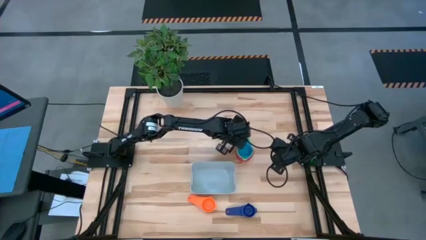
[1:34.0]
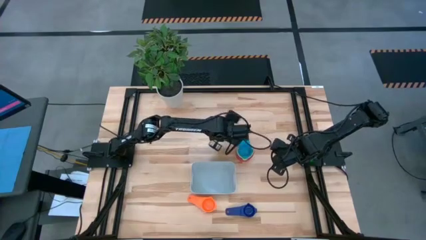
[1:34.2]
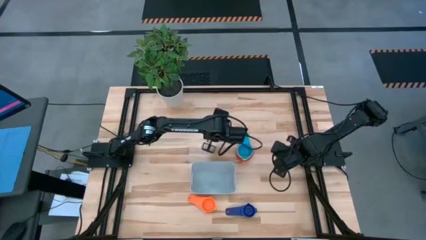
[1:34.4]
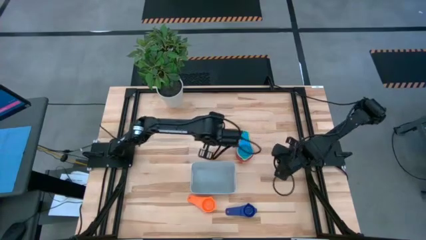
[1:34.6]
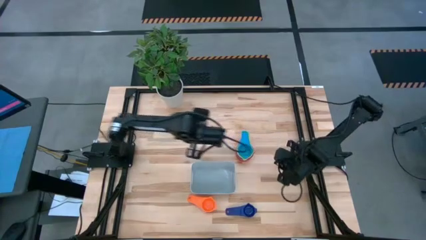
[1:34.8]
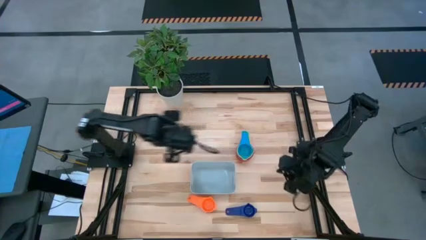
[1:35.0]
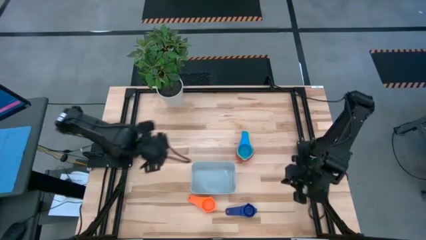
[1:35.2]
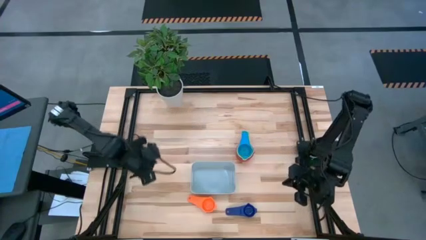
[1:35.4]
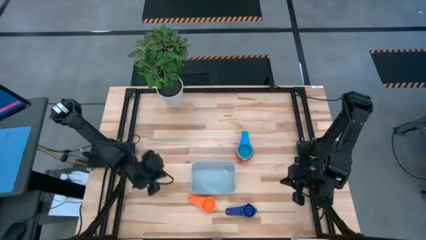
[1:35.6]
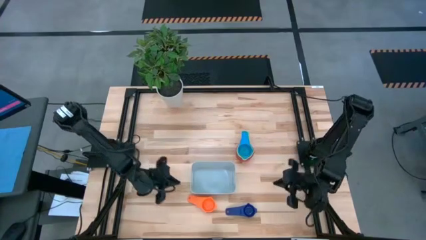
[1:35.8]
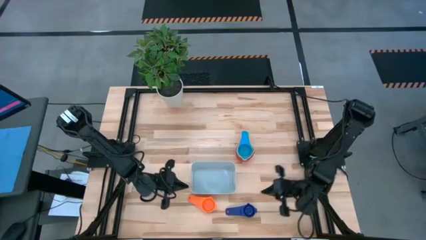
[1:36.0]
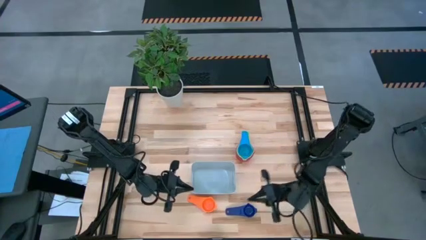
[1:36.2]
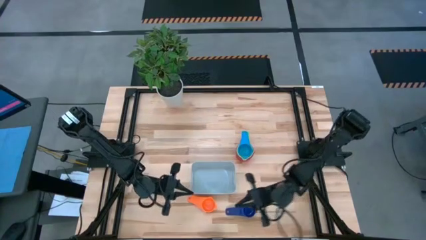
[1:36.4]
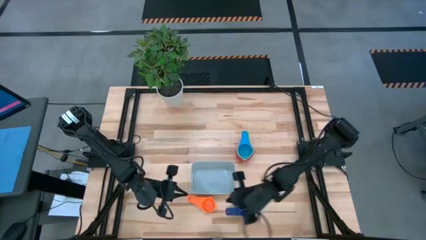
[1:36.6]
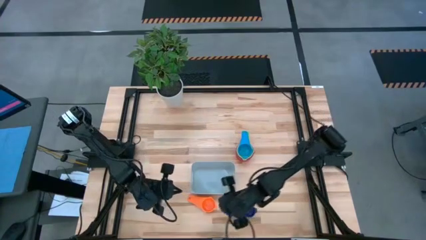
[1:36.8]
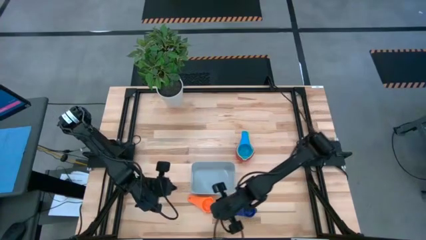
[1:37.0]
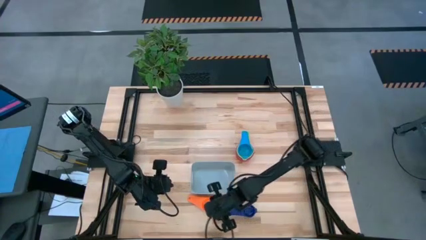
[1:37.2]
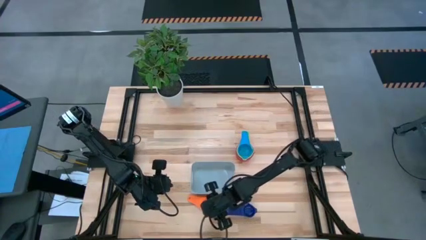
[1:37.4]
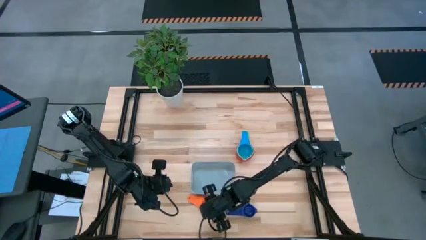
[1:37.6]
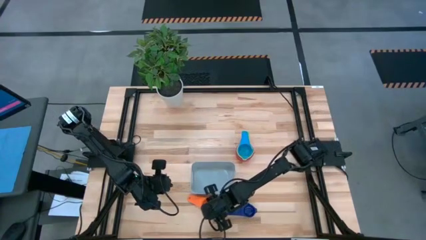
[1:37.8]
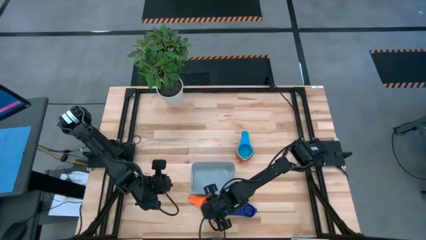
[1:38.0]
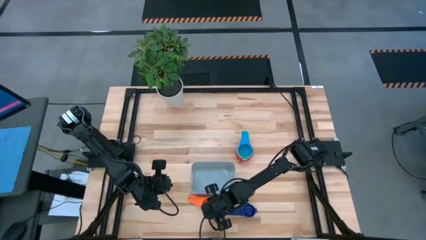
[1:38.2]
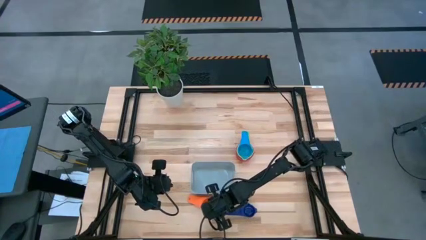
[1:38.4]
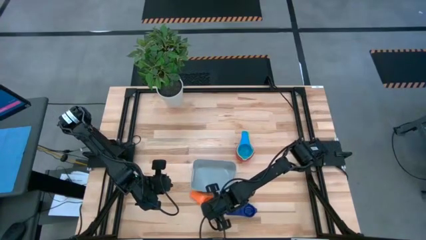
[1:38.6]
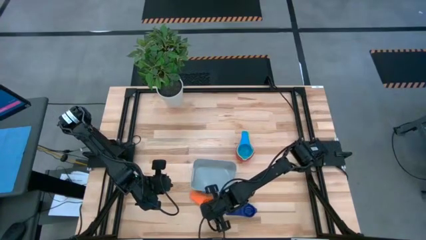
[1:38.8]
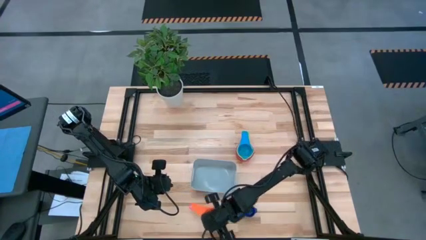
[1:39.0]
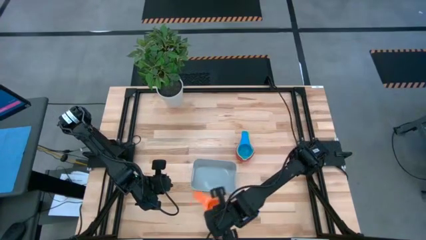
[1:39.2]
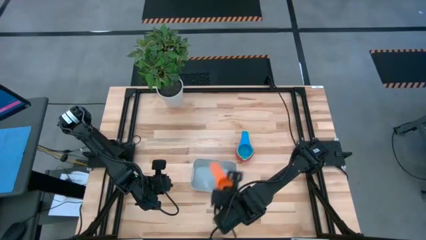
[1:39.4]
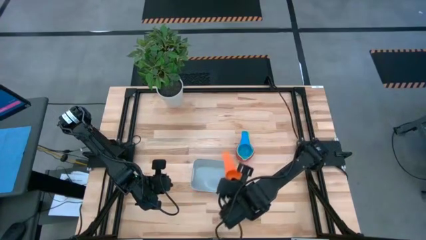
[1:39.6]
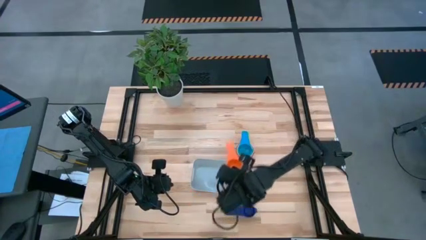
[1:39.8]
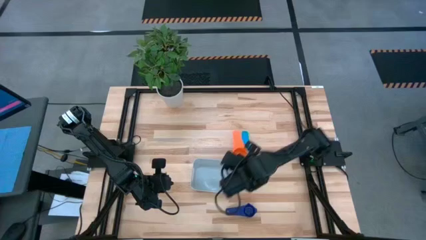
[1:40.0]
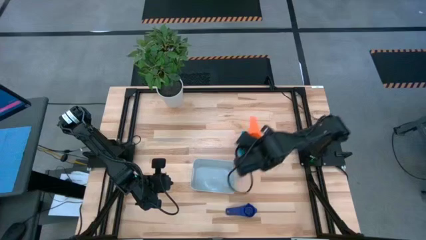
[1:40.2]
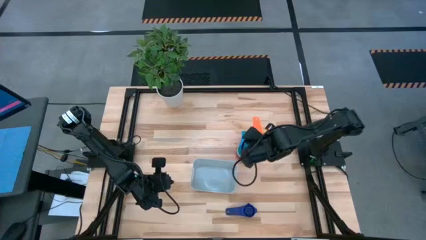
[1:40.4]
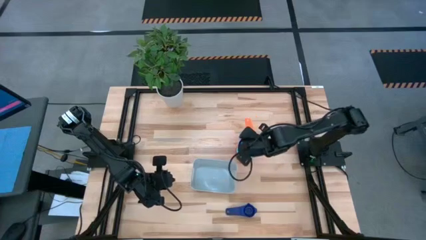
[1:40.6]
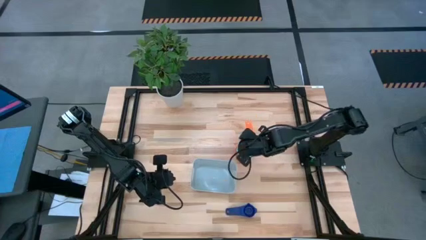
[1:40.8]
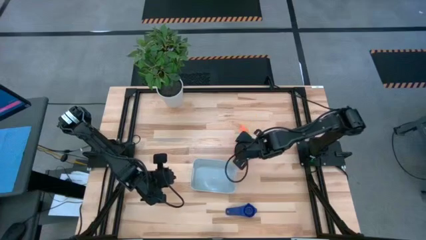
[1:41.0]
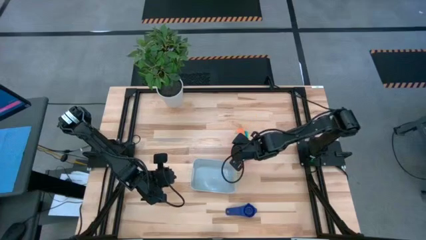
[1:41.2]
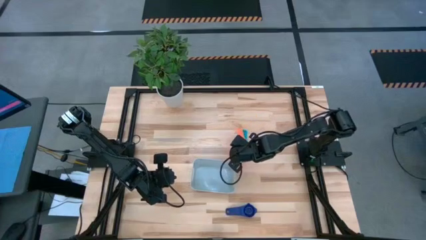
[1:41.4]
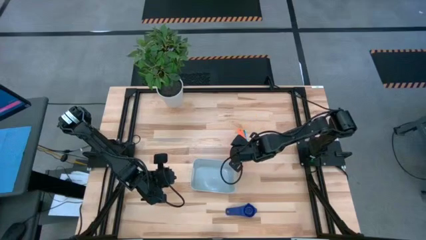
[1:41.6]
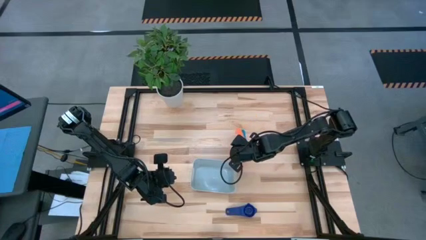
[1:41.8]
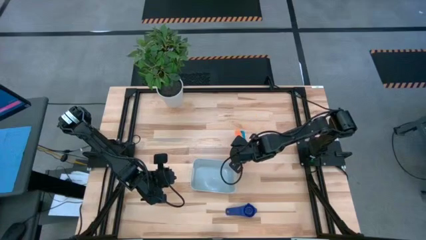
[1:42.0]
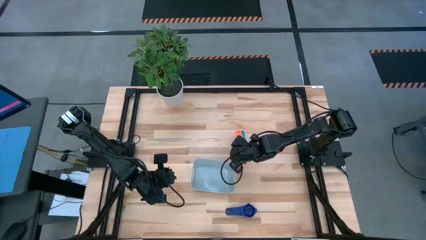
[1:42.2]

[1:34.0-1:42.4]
Task: Nest measuring cups in basket
Stack the orange measuring cup on top of the light blue measuring cup

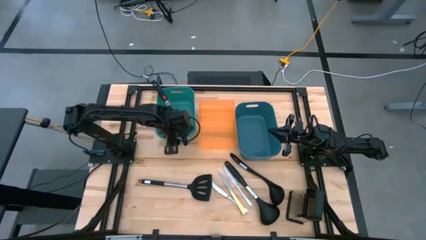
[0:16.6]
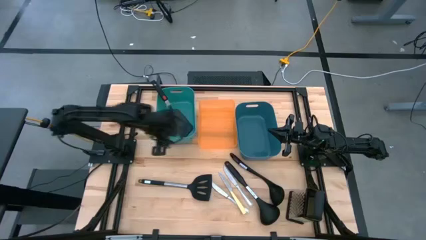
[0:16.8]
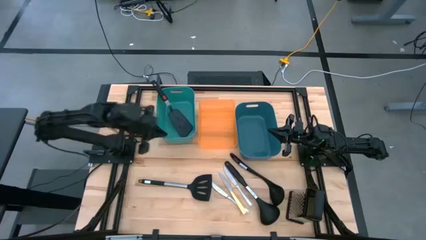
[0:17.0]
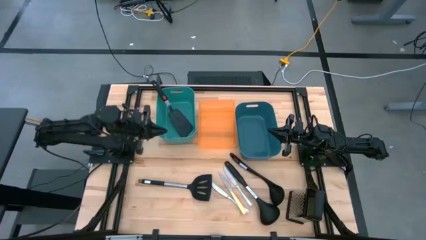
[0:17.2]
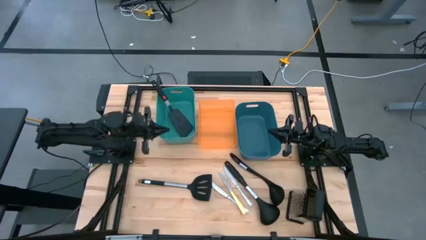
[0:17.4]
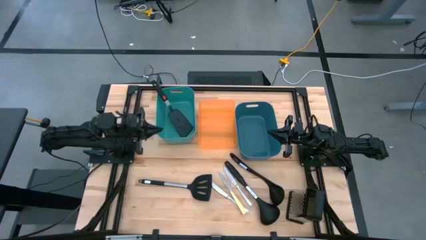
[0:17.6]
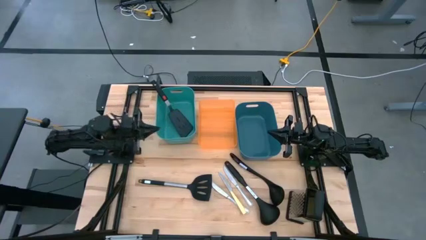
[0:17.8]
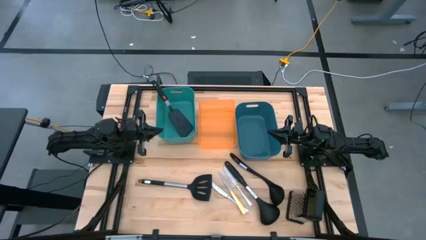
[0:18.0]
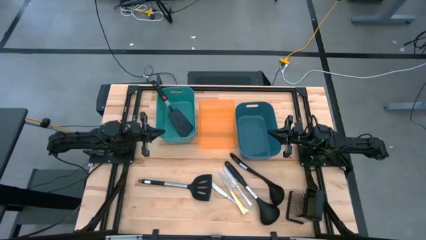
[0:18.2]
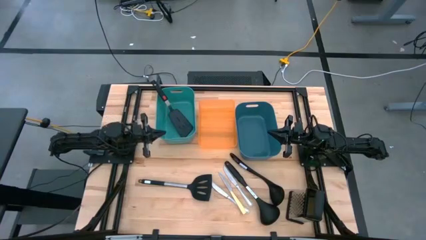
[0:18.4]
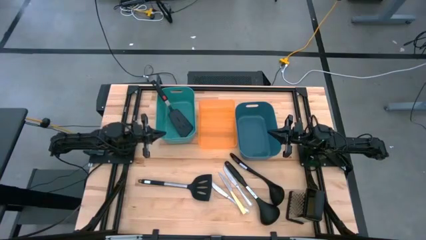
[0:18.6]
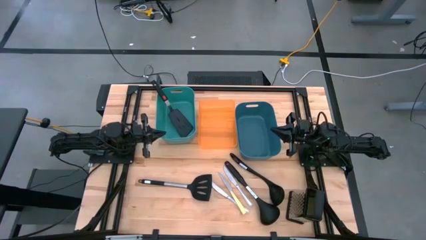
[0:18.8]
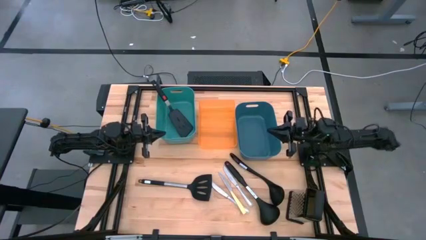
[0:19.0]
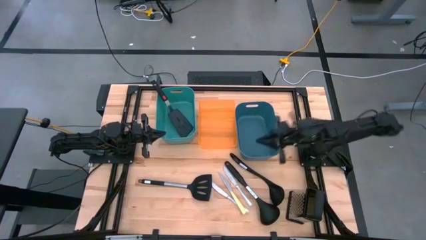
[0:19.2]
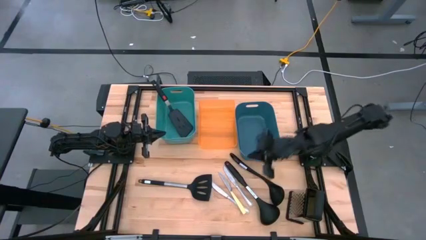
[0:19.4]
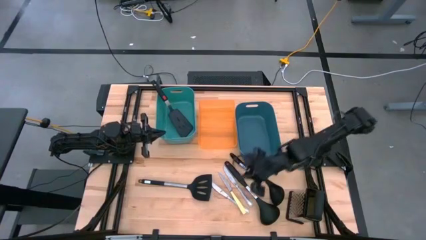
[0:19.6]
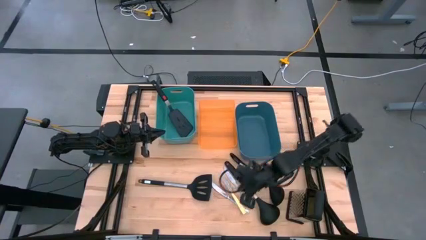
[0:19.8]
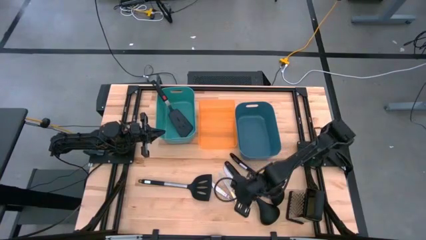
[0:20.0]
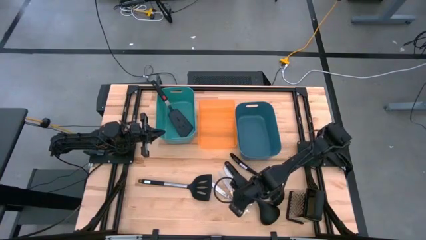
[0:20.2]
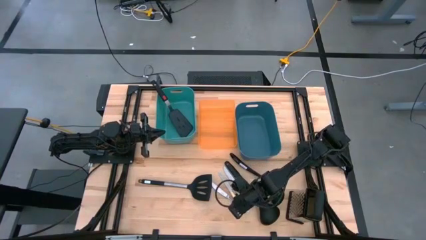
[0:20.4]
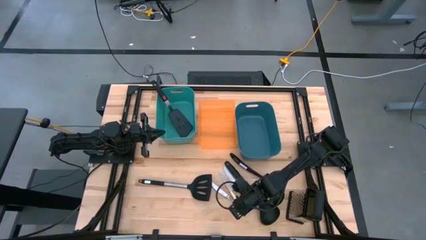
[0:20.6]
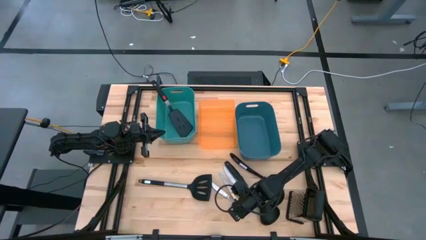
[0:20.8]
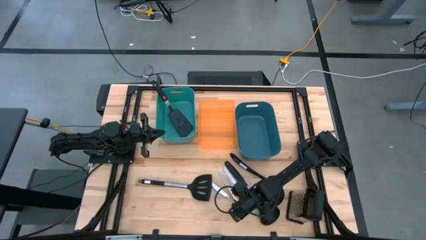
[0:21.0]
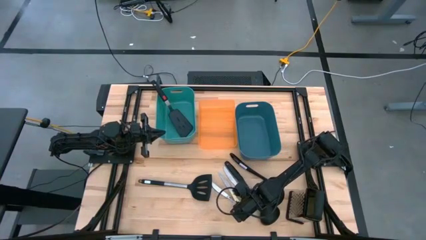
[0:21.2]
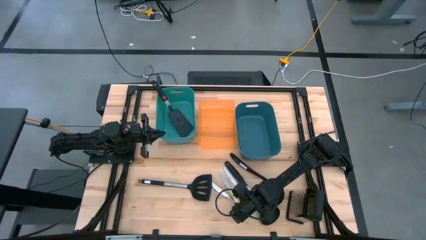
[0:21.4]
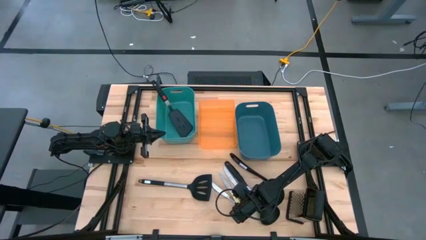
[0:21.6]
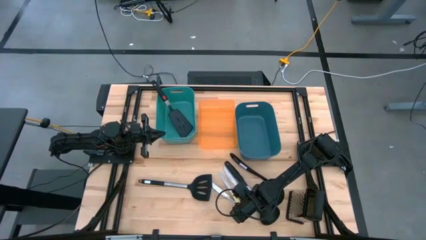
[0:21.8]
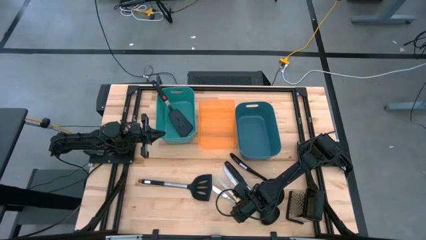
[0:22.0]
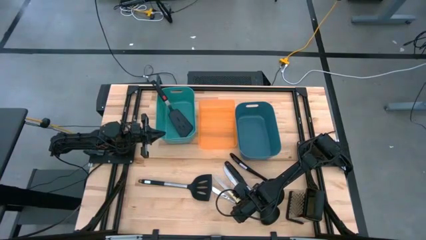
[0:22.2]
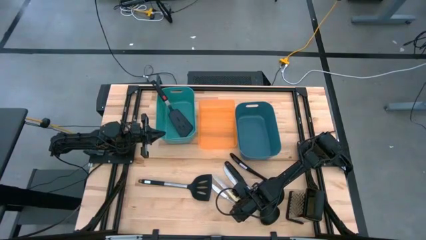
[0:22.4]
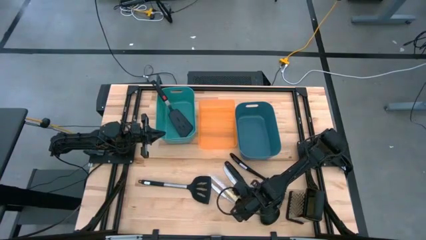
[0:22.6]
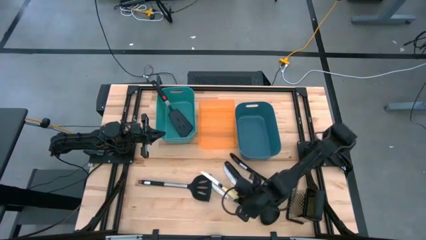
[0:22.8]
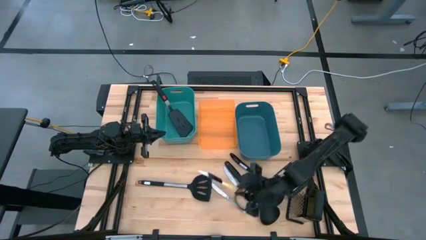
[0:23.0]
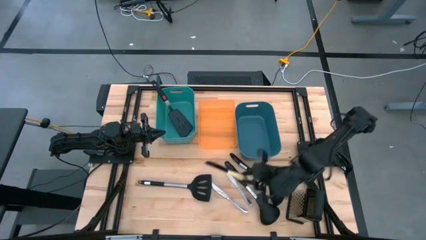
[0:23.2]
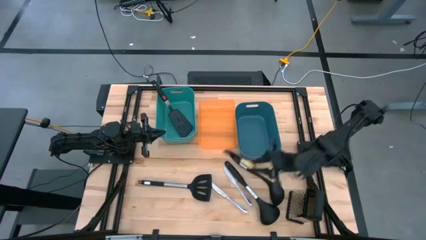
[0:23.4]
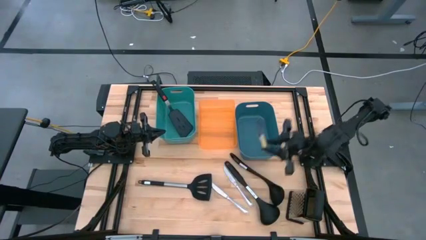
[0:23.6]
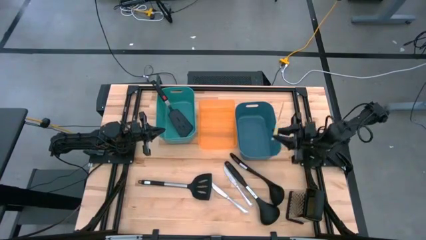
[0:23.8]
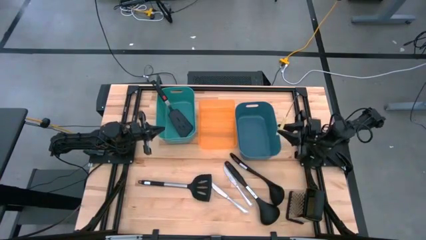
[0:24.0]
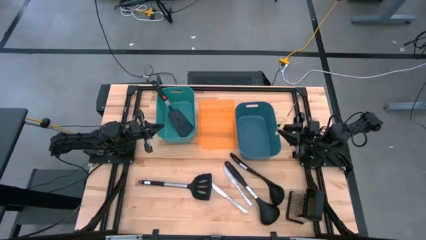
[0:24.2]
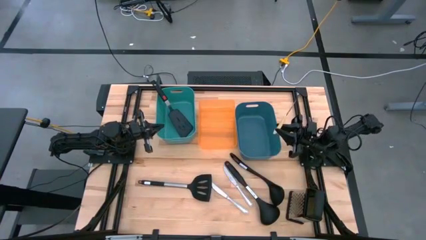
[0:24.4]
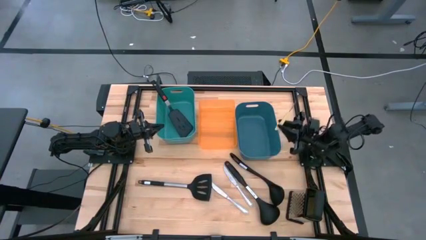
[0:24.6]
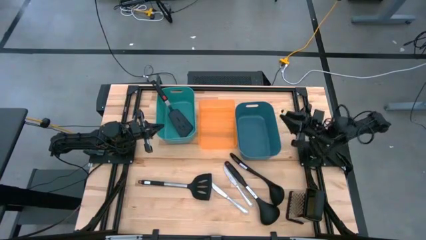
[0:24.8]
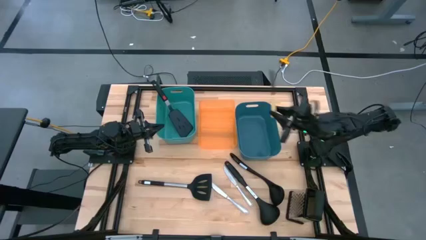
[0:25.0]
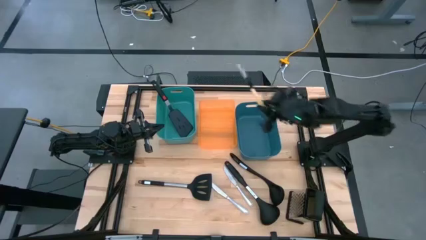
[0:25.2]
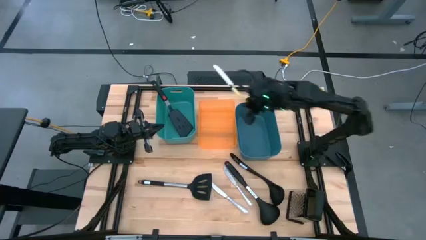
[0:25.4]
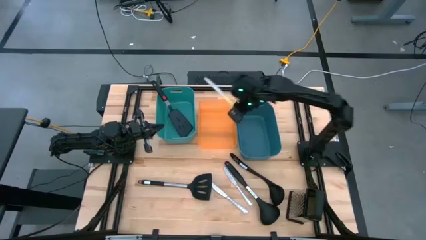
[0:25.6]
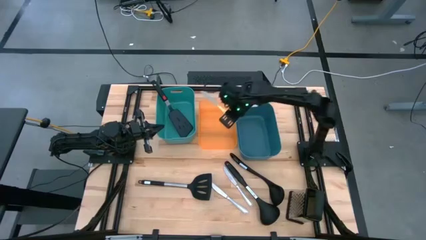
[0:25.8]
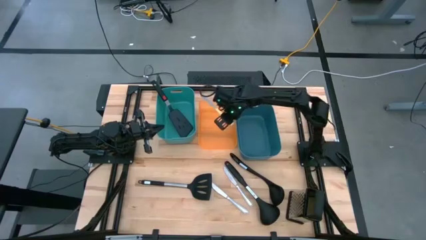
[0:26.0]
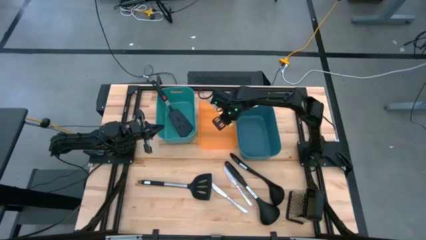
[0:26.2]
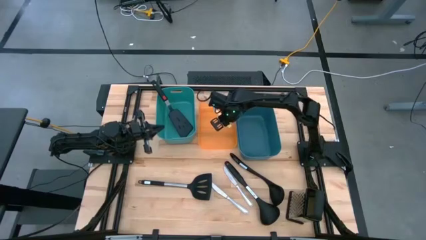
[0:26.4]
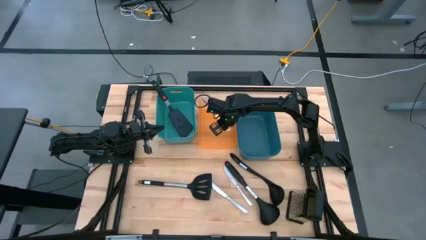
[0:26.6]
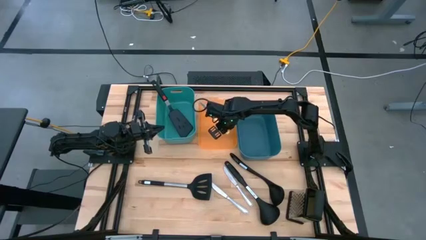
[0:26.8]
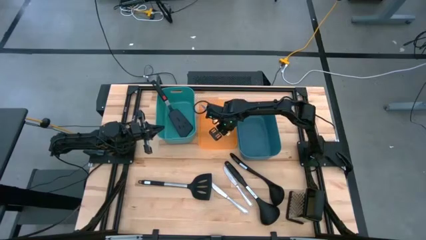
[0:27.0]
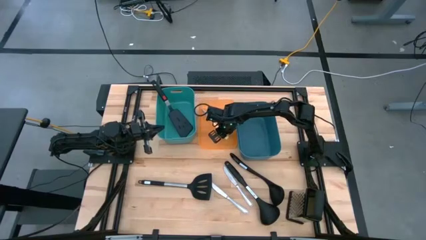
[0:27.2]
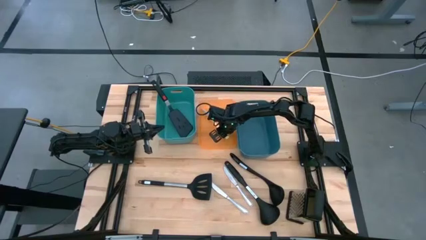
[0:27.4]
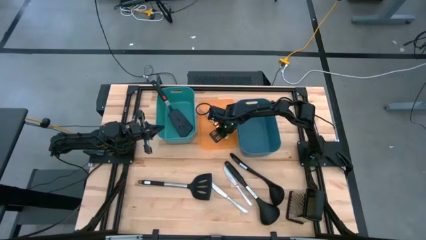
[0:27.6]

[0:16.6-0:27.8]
Task: Pick & Place Kitchen Items
Put the yellow knife into the orange bin
